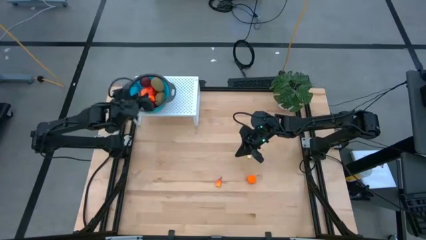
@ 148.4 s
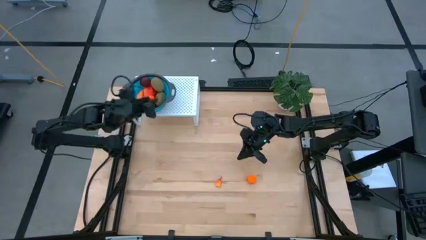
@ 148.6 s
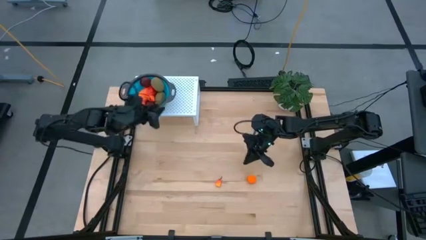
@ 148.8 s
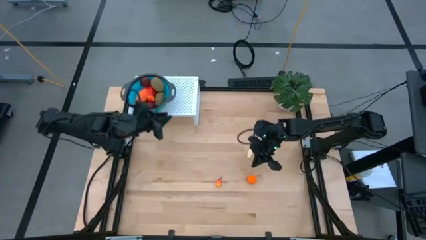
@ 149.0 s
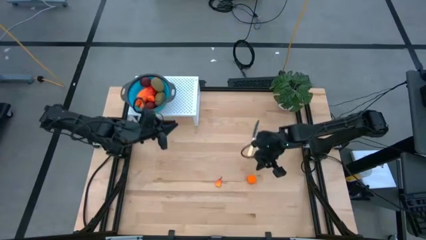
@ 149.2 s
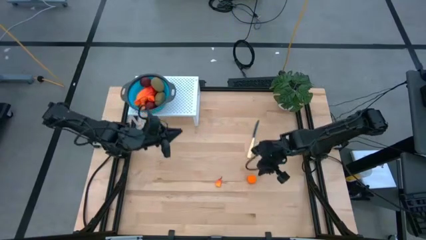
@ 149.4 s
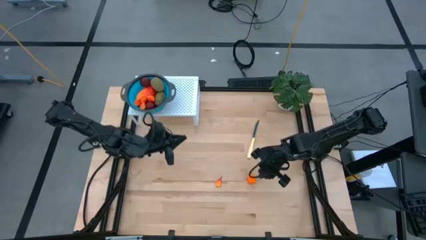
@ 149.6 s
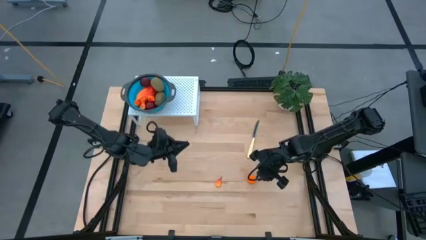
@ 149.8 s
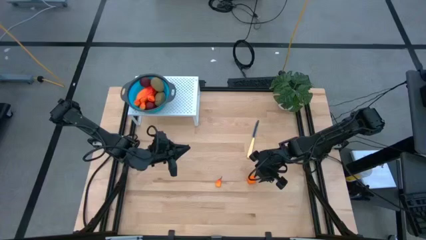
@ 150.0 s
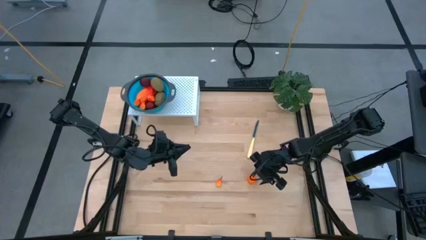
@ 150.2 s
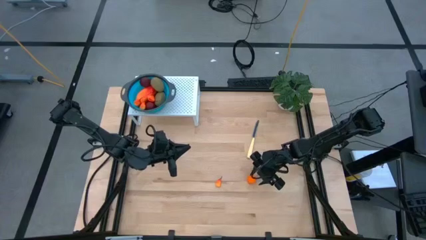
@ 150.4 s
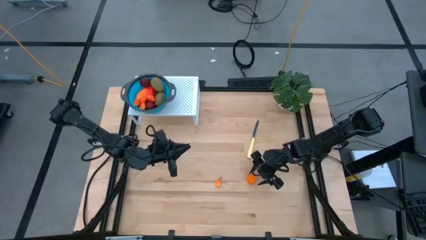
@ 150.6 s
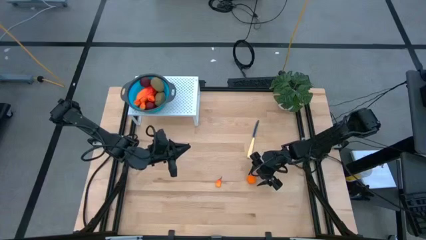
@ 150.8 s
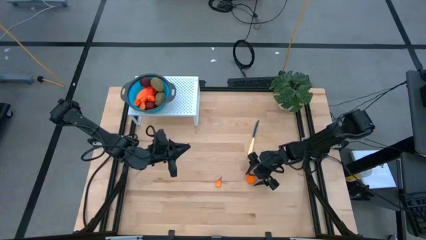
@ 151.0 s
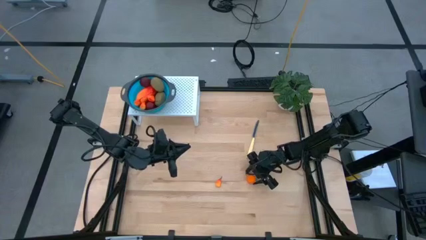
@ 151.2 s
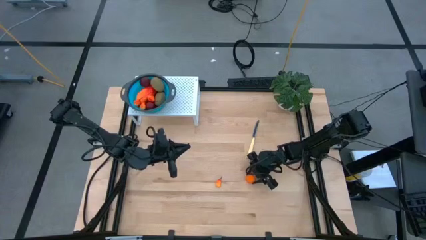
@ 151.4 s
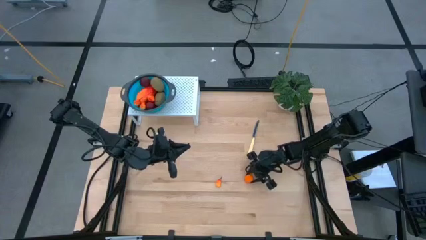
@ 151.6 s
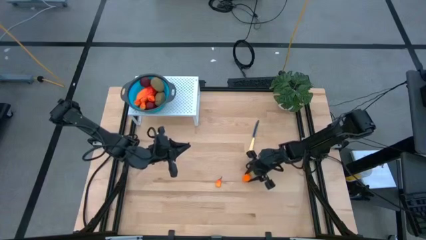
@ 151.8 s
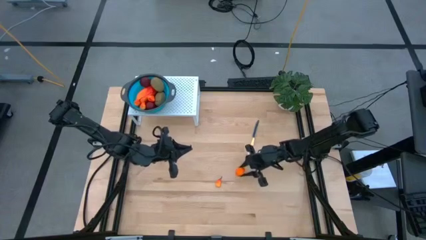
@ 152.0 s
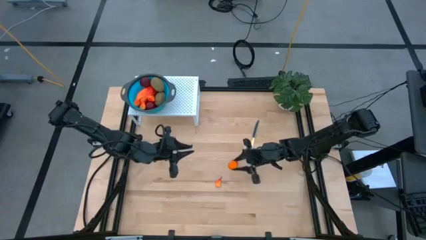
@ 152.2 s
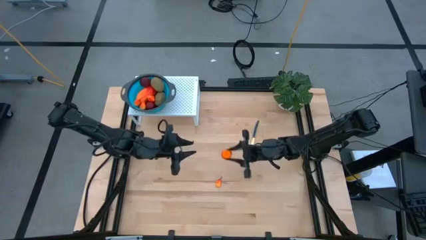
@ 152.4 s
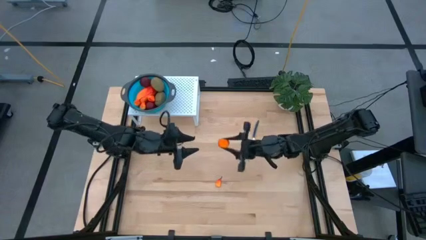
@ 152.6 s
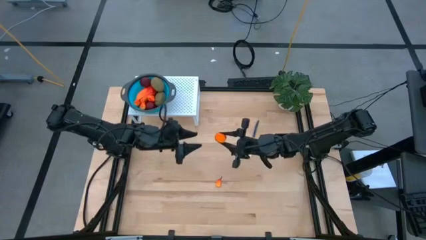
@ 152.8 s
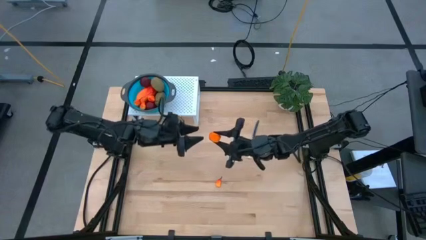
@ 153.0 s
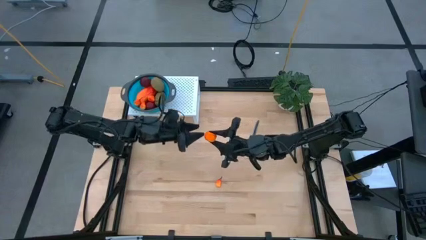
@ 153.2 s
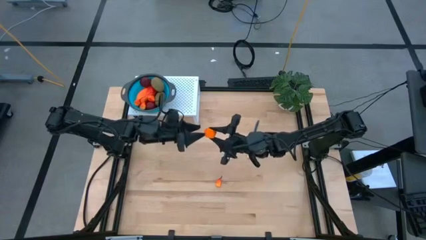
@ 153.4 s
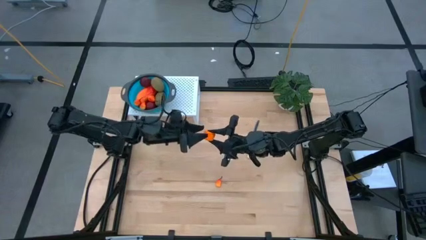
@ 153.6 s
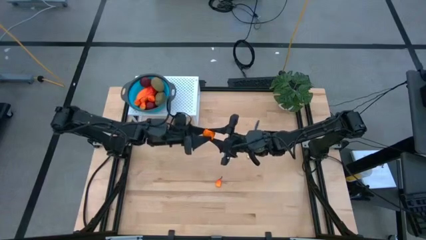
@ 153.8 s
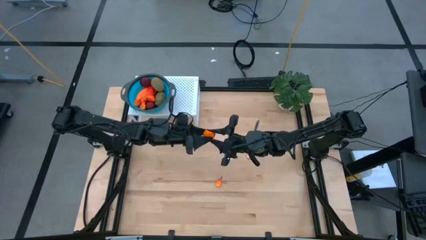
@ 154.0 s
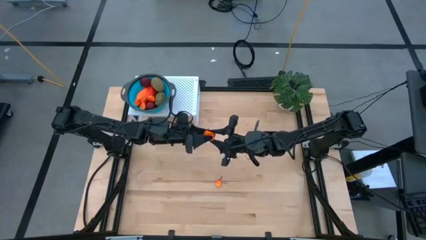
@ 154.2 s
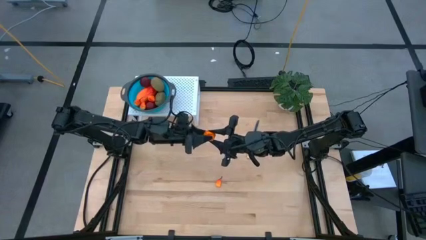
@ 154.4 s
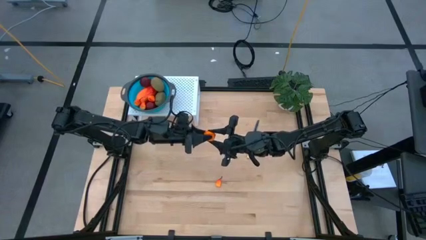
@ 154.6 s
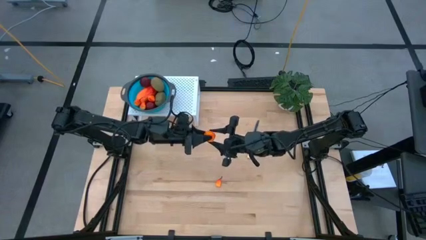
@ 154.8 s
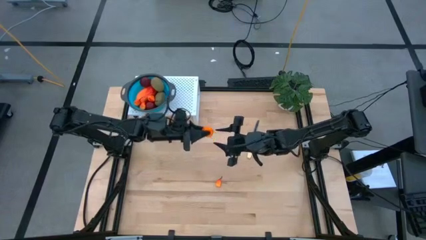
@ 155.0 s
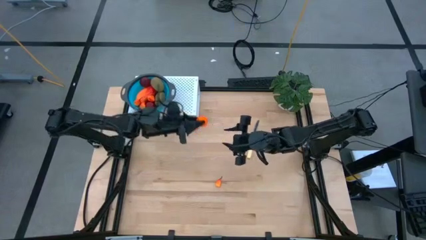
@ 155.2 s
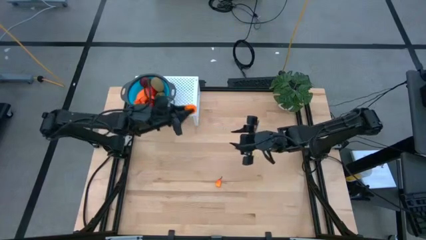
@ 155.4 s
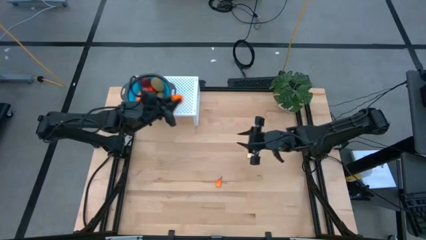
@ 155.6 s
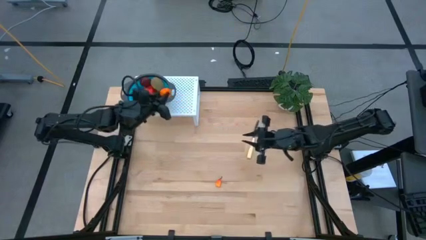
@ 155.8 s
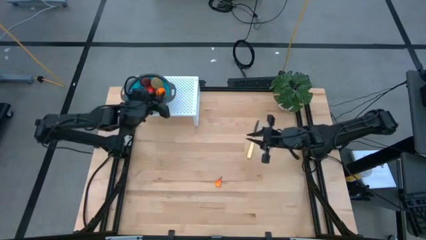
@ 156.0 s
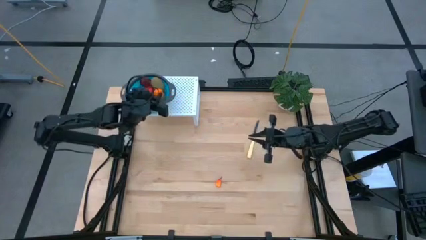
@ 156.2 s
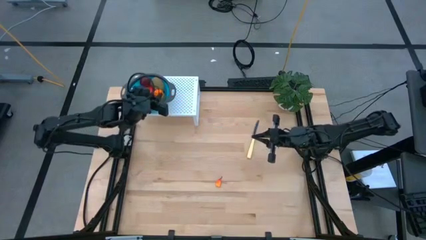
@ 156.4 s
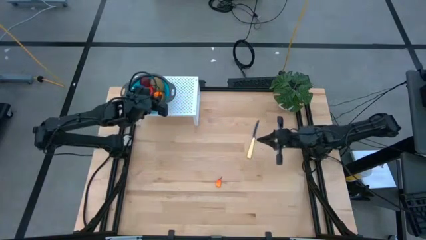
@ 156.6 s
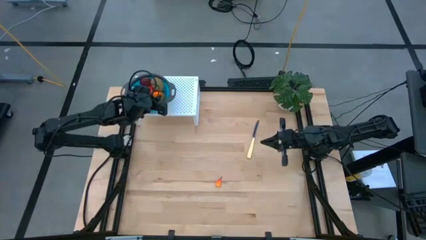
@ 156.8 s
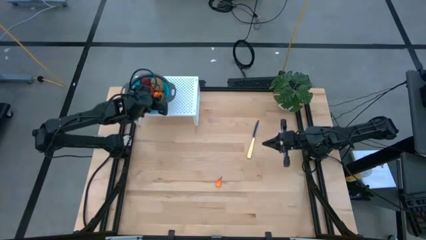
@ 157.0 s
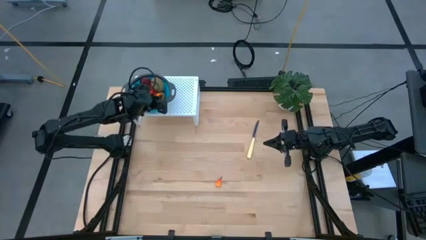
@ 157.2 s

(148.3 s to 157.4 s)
Task: Pick & Place Fruit
Put the orange into the blue strainer bowl on the shelf

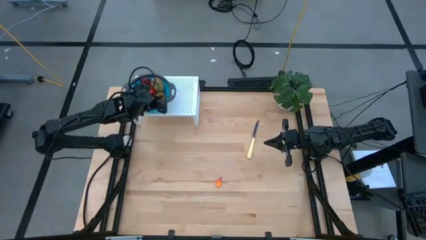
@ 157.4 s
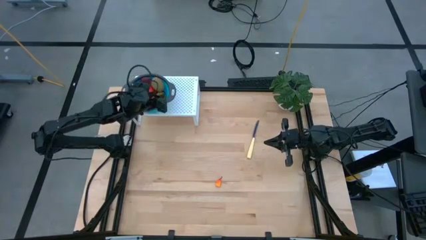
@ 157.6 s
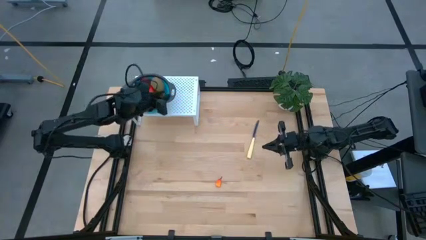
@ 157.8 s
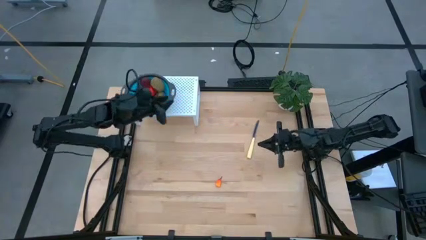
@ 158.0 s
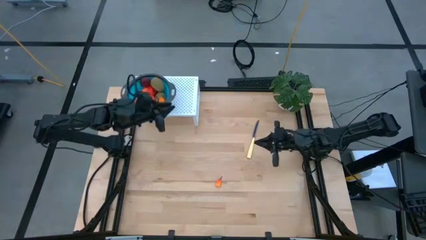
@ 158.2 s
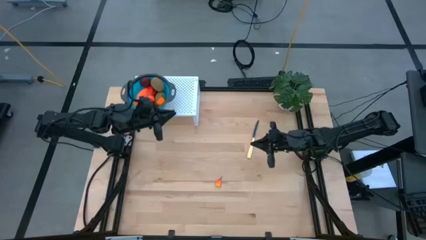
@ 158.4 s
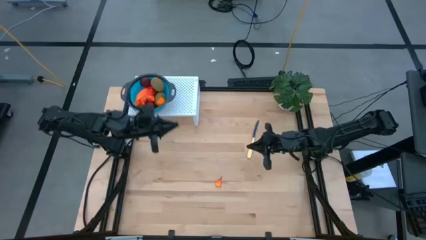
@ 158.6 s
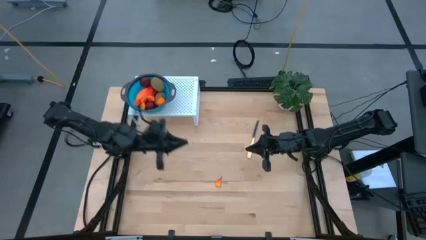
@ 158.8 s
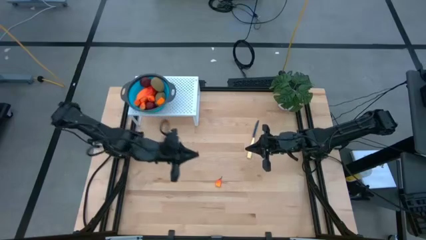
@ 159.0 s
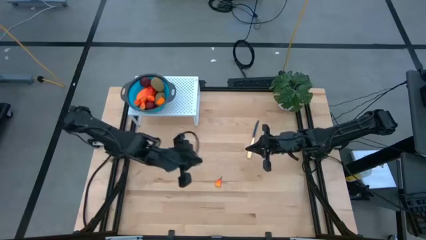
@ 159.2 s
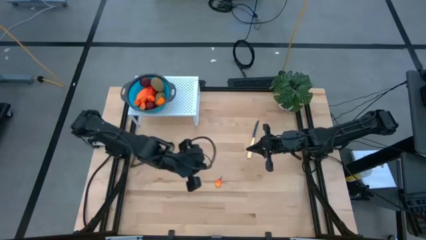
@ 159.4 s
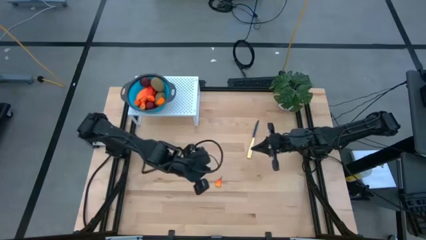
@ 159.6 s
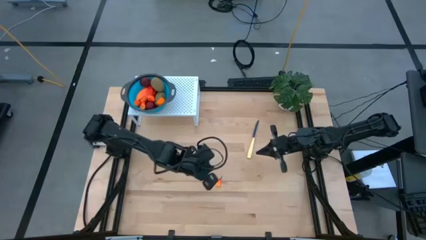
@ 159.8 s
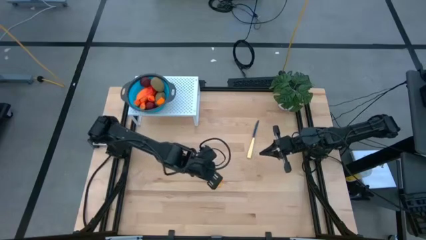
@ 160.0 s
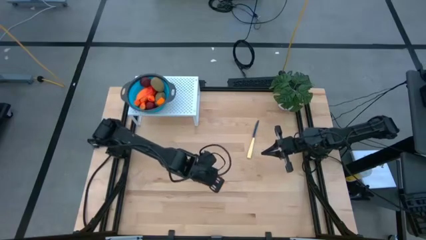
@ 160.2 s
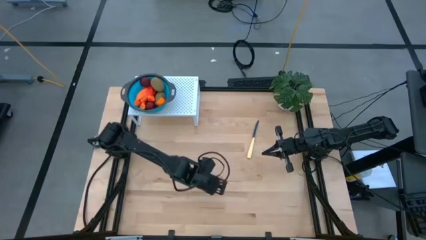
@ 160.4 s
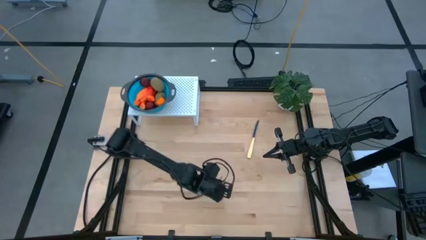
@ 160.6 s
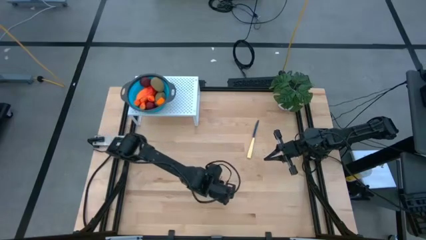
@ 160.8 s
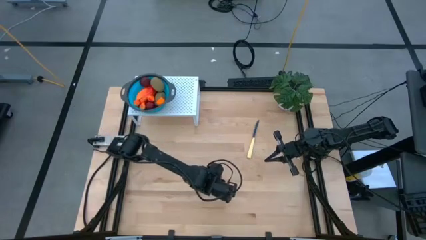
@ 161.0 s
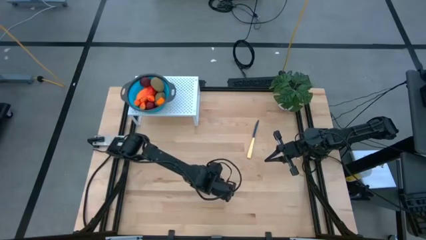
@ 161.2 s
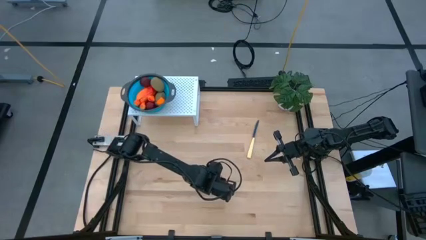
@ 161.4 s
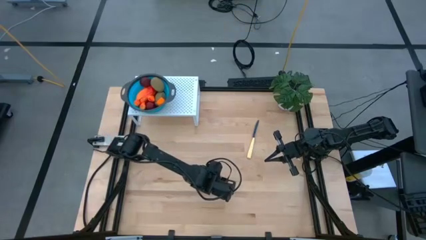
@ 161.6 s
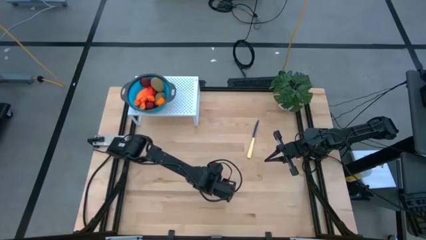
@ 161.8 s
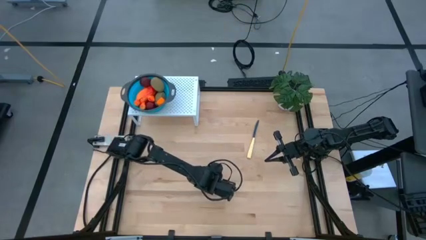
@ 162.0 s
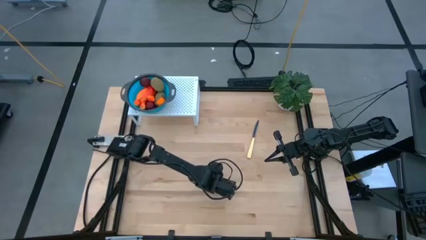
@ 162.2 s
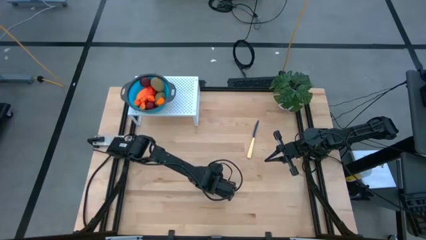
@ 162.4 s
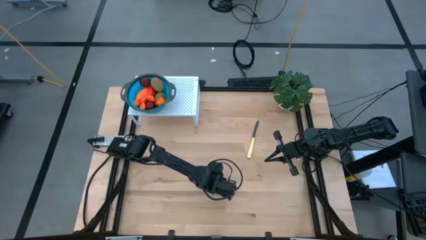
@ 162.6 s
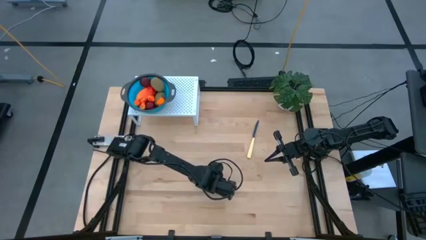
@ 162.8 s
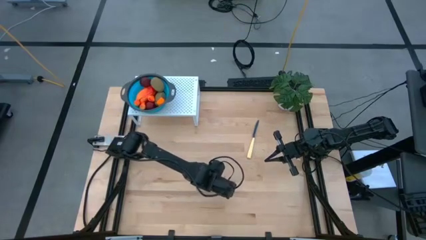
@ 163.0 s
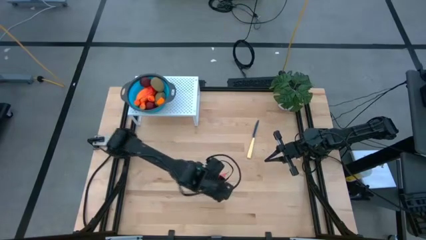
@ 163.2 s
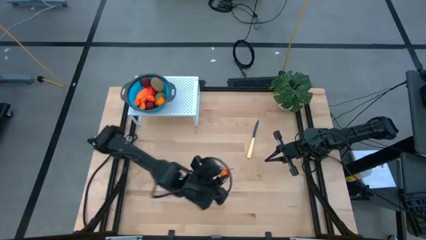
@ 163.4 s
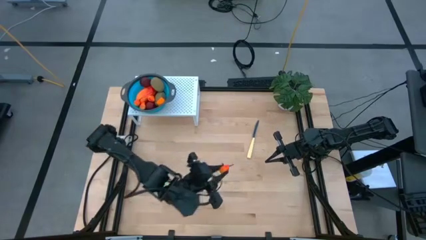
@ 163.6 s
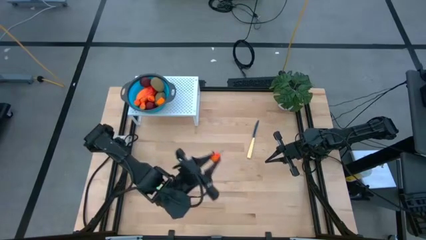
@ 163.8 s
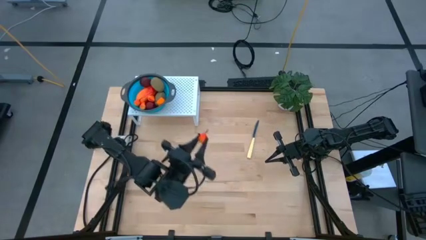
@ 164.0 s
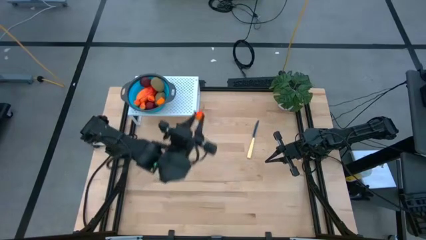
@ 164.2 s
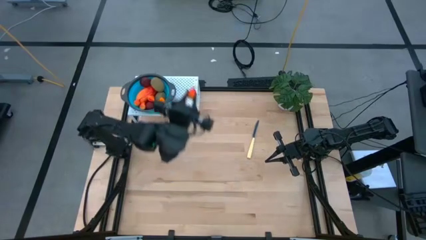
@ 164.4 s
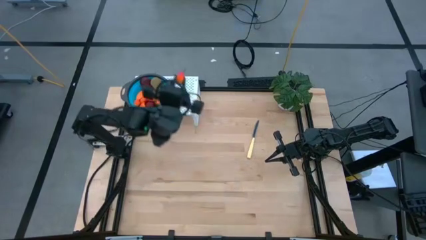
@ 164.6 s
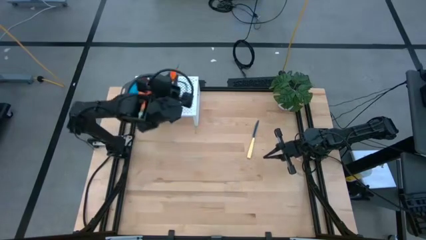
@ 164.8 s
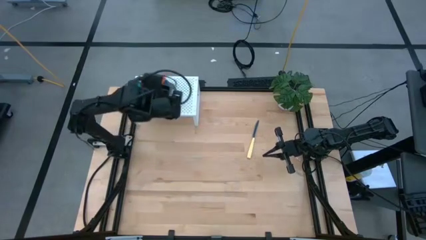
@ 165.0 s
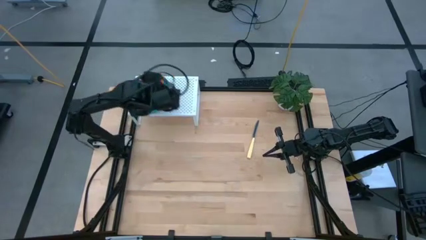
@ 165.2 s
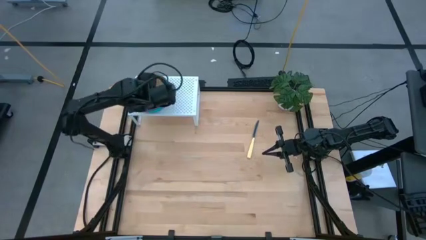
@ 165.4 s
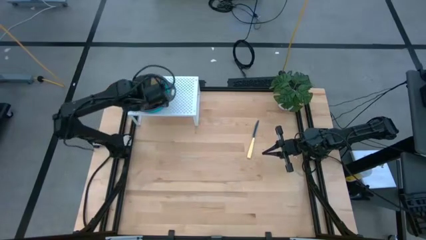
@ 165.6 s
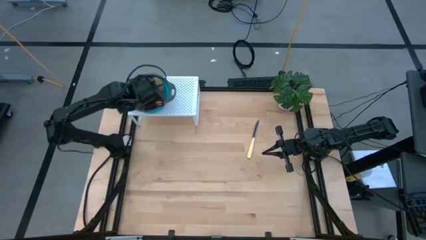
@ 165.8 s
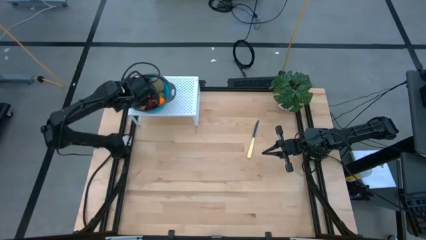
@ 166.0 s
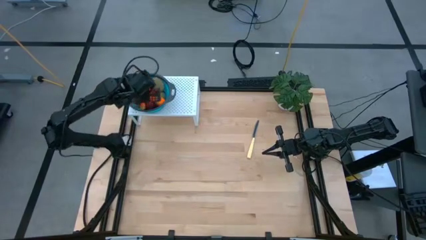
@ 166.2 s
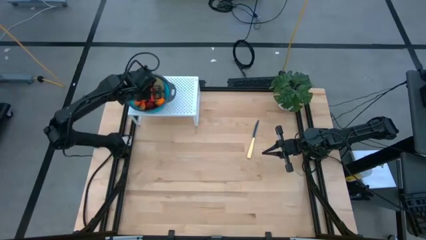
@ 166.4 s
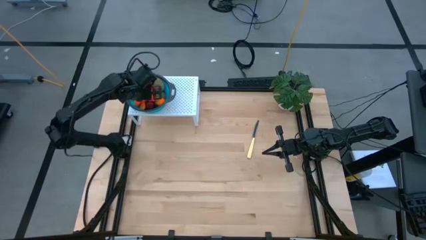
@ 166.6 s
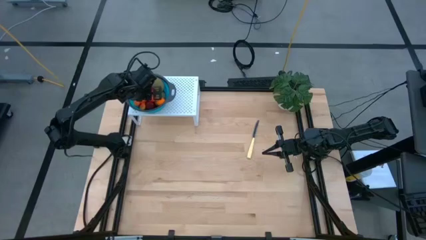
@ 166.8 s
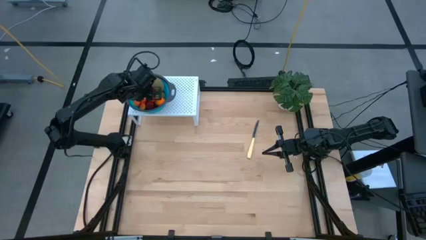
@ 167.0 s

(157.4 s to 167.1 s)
Put the orange peach into the blue strainer bowl on the shelf
